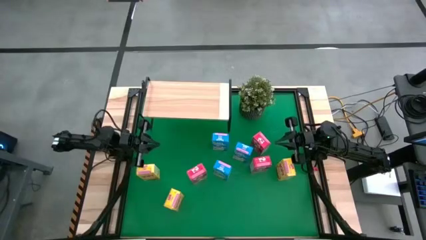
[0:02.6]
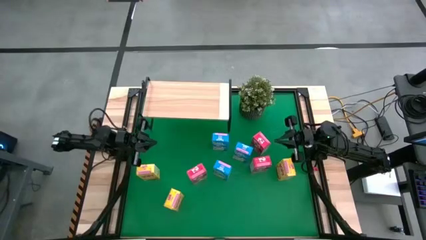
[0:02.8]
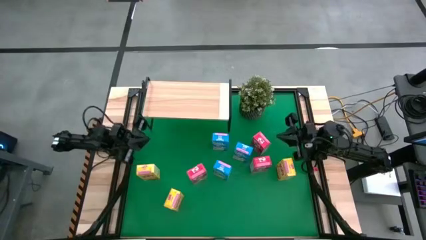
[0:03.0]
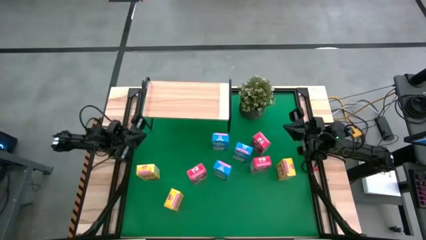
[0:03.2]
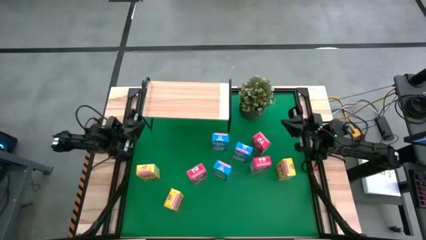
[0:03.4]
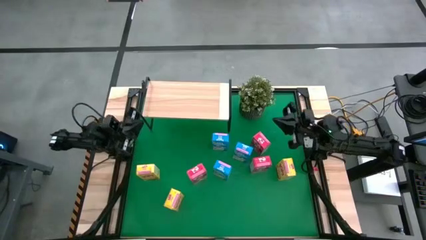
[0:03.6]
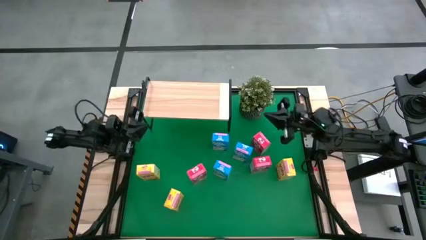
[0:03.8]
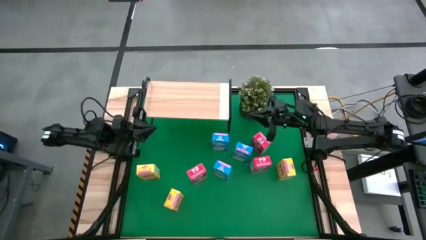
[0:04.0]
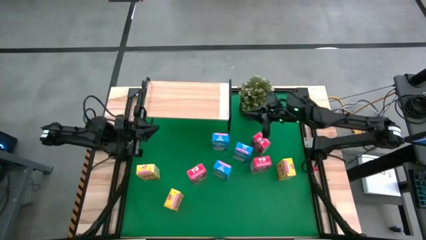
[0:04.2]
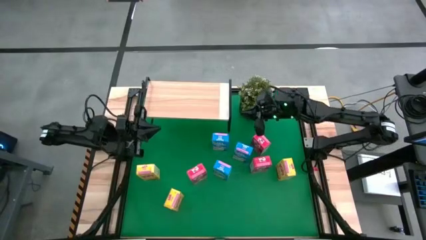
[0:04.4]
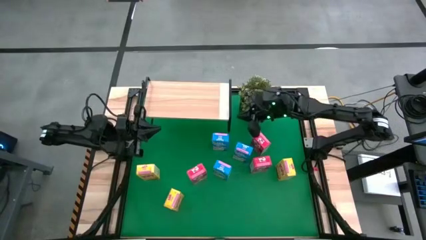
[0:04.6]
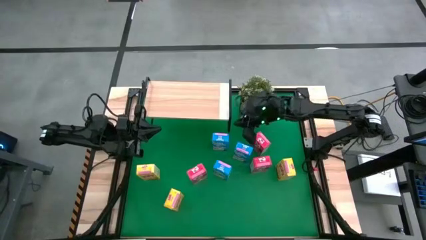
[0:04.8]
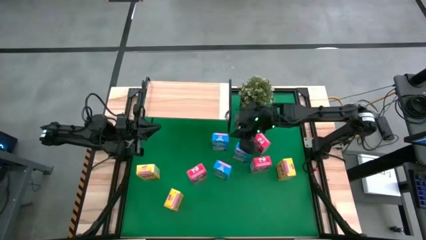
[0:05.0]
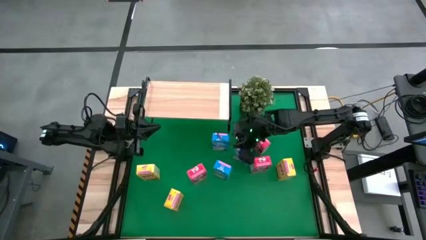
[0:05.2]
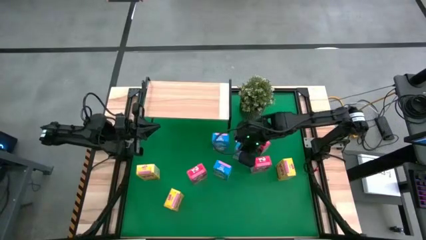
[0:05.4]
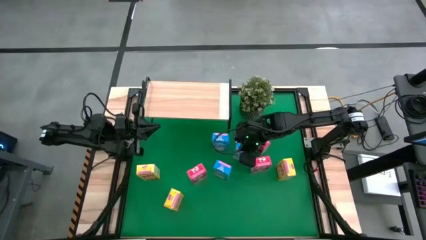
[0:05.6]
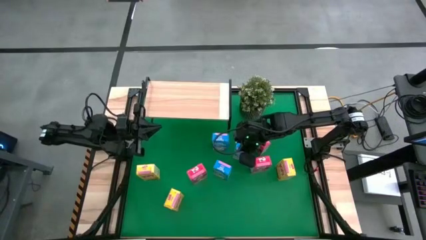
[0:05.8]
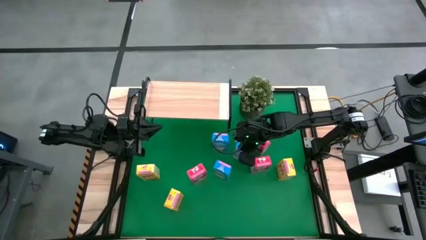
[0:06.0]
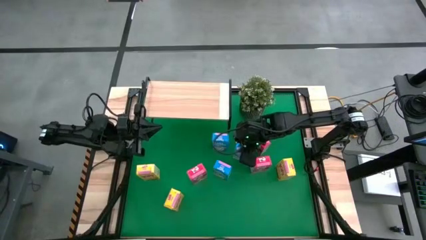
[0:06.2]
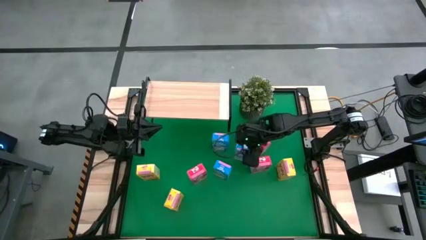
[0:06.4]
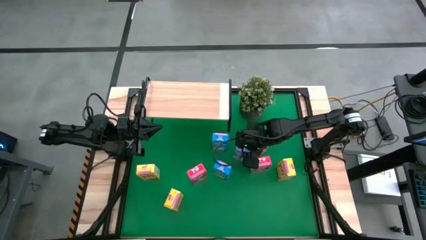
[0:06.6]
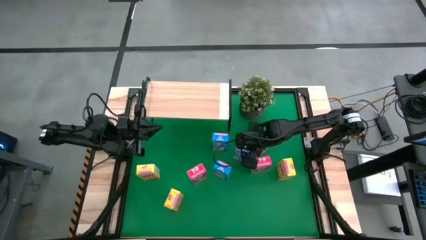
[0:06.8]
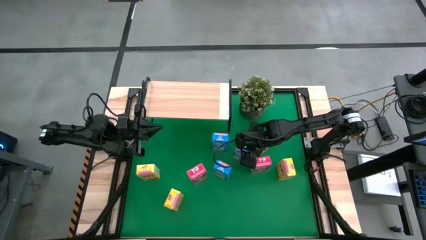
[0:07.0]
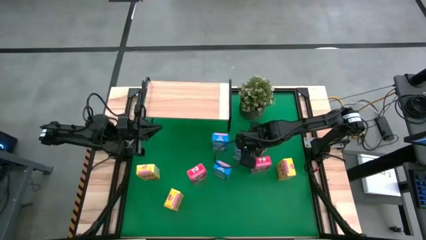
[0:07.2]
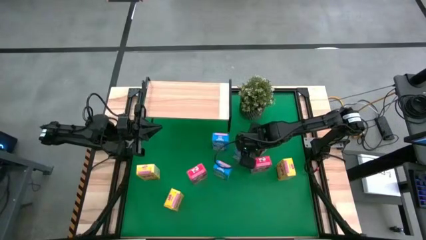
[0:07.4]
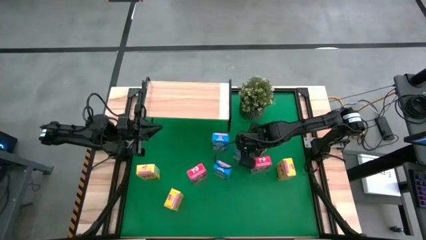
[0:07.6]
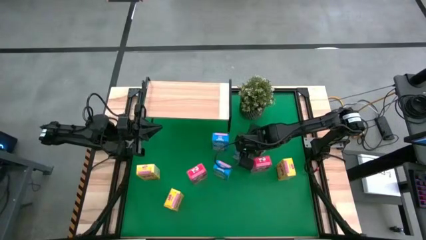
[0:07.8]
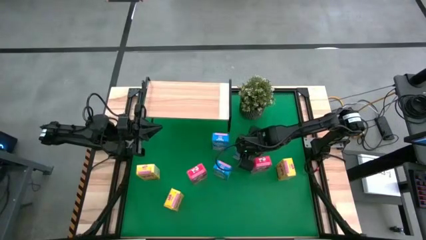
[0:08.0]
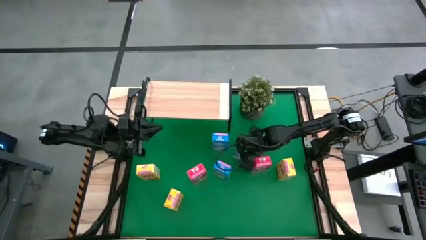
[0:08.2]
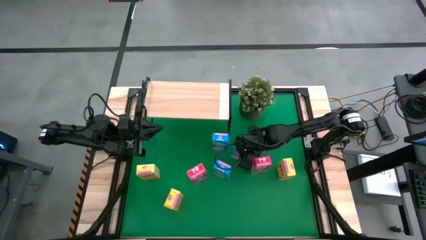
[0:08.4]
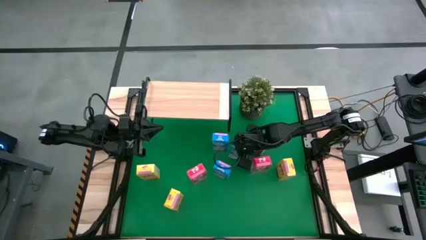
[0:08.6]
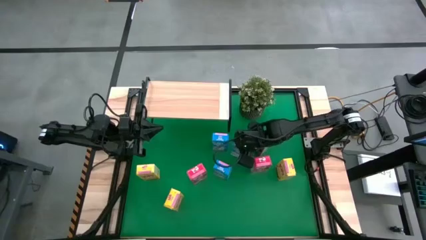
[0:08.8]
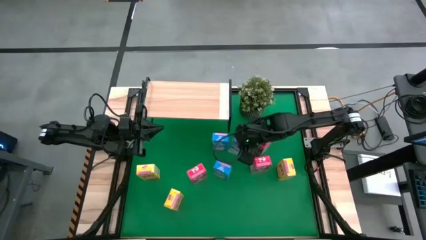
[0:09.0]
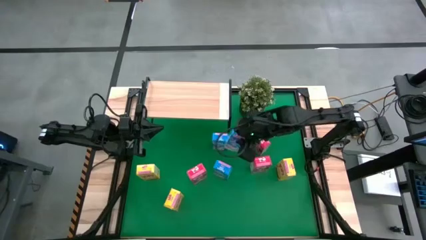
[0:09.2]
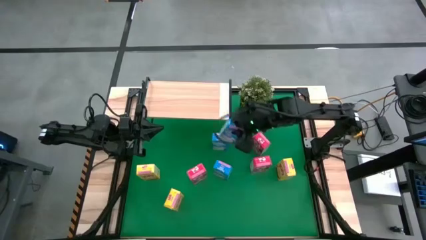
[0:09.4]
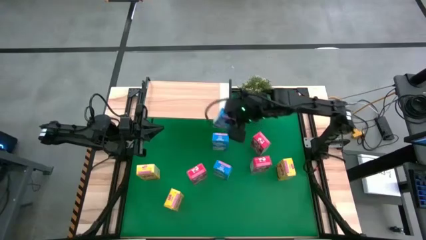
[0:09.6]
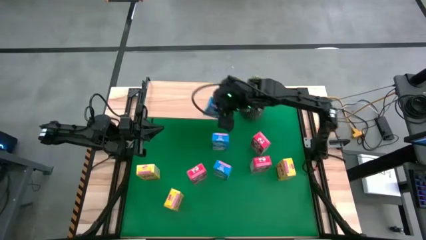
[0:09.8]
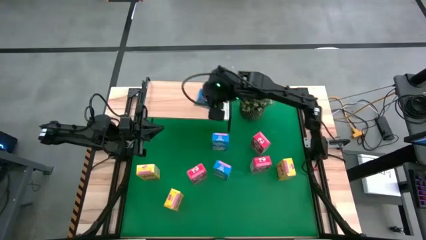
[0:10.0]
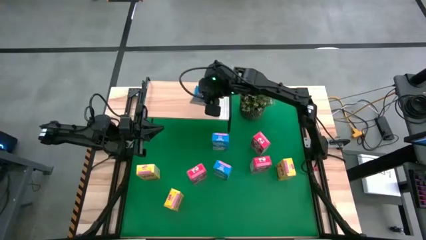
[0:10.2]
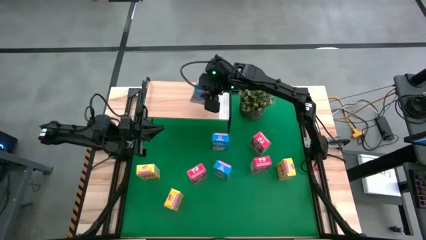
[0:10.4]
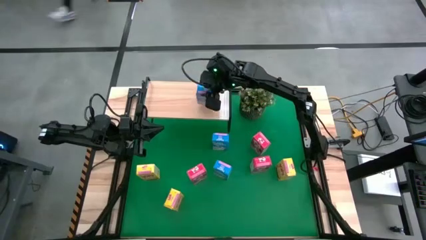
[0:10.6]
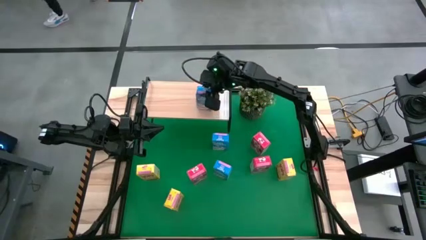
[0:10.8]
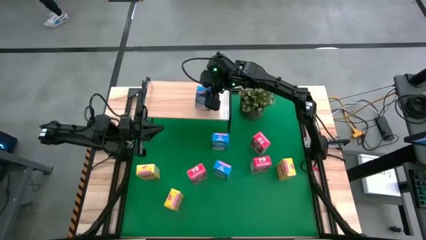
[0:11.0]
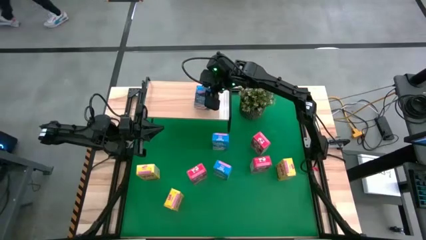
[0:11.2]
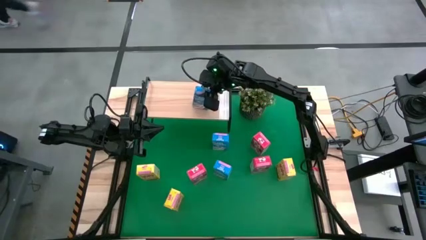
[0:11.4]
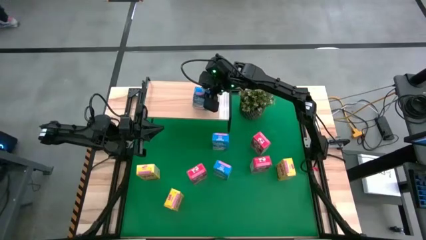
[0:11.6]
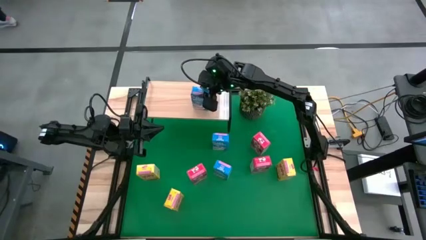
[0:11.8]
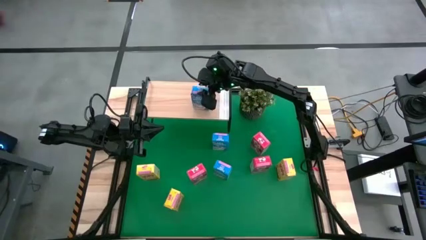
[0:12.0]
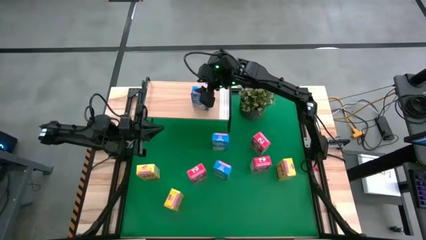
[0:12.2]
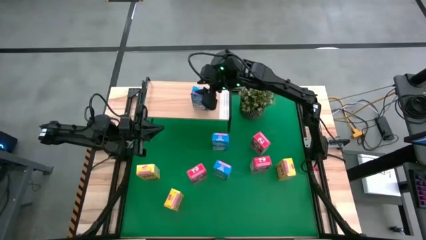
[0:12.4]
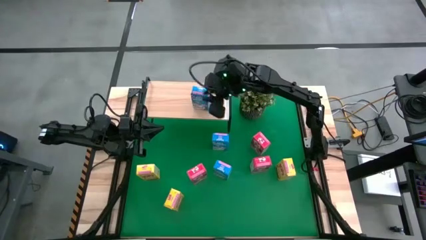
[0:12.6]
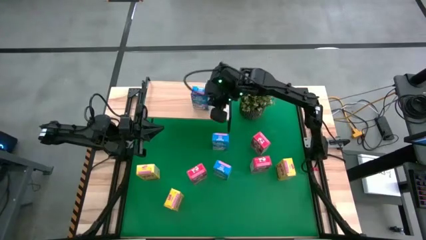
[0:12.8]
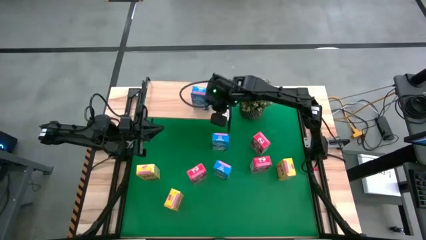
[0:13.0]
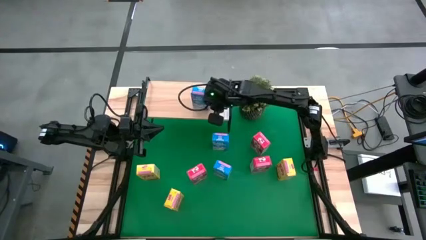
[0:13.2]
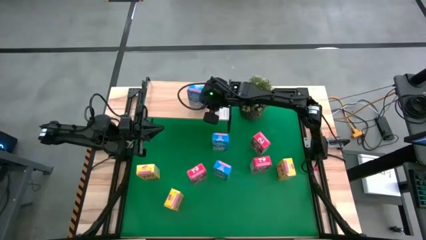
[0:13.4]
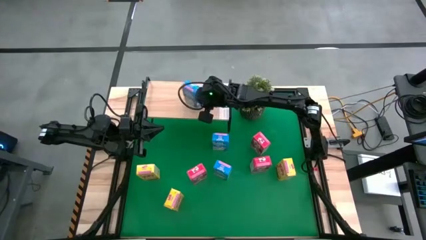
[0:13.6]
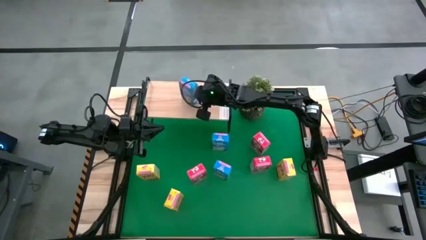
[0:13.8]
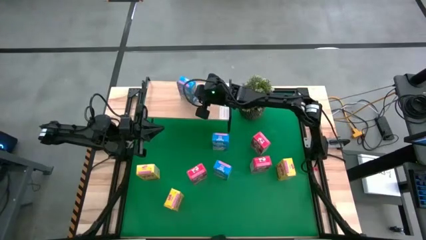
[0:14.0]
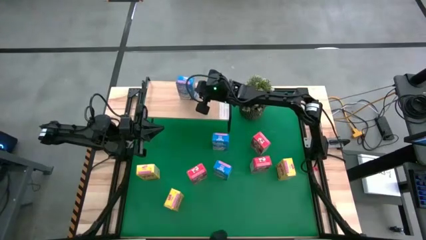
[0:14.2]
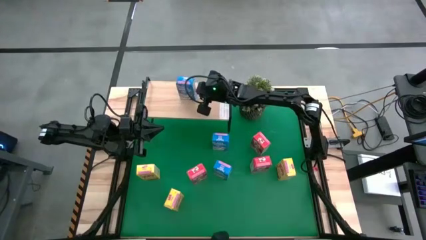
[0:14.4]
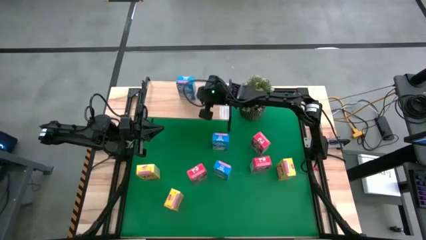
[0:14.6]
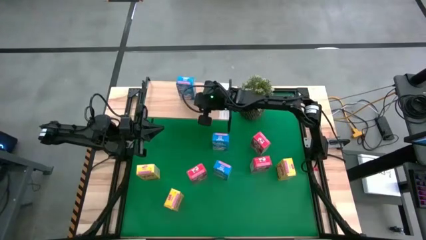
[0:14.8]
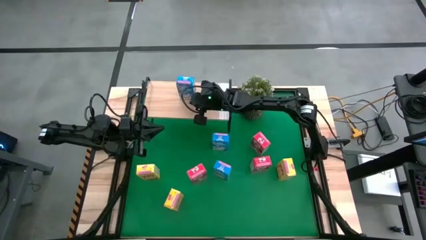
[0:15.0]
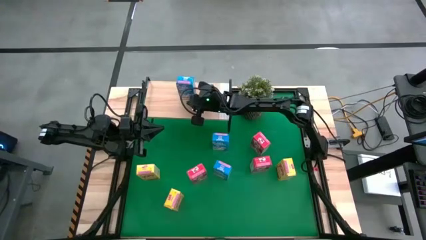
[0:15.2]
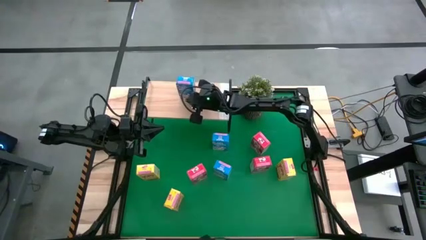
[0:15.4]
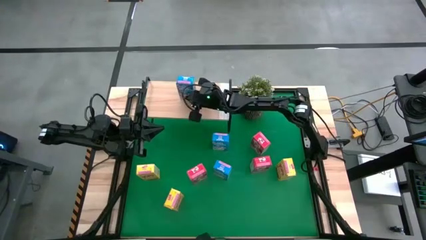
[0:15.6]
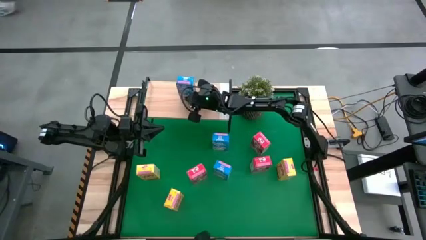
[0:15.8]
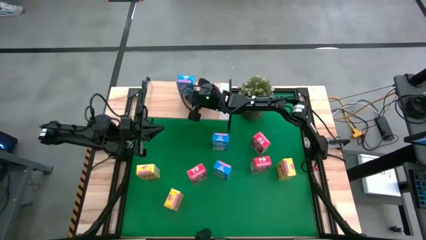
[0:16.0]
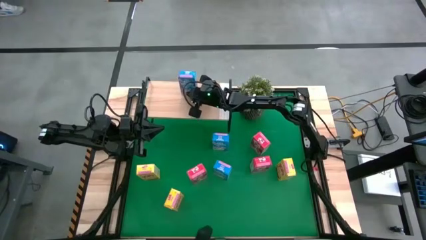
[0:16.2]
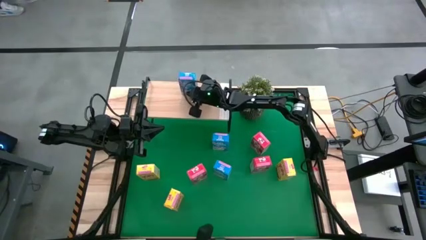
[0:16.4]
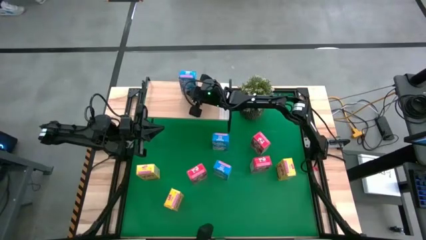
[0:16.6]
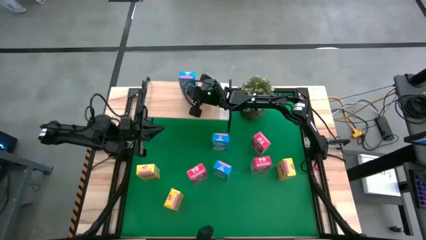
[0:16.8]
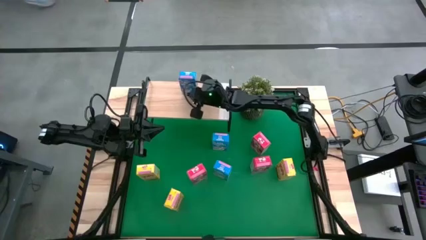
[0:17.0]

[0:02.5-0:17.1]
Task: Stack cereal on shelf
Put the middle right blue cereal box on the shelf
